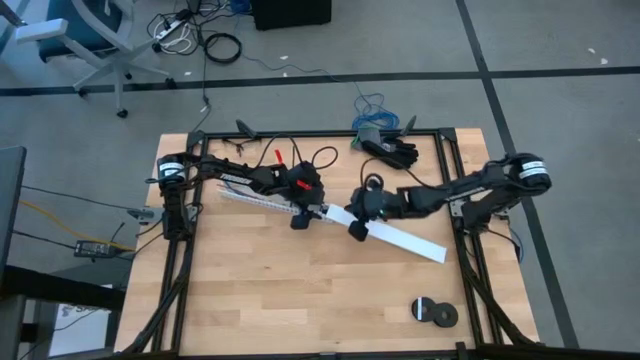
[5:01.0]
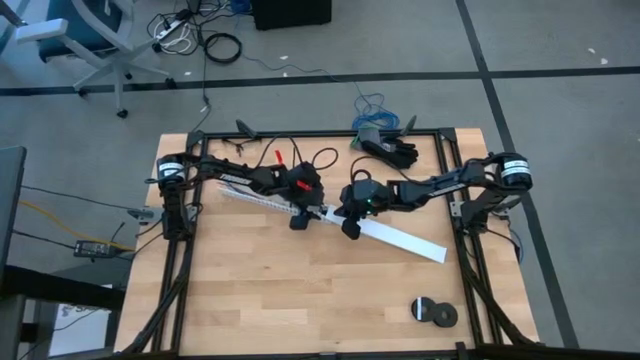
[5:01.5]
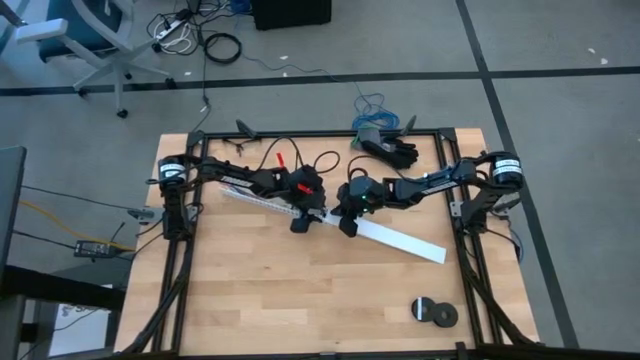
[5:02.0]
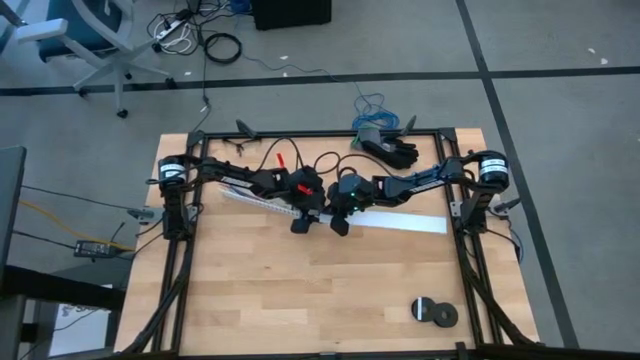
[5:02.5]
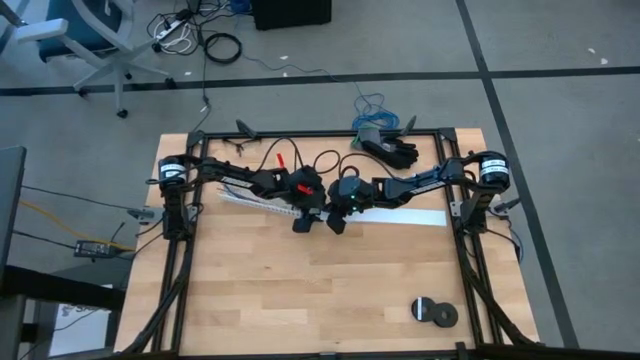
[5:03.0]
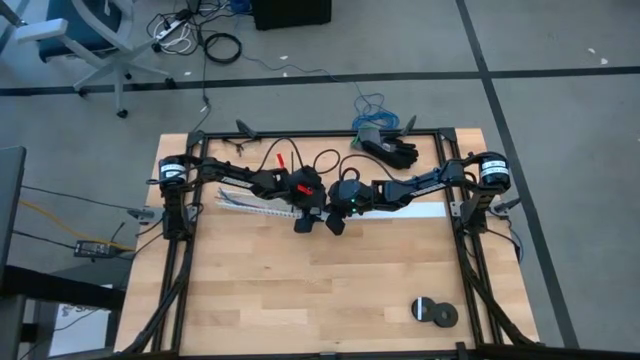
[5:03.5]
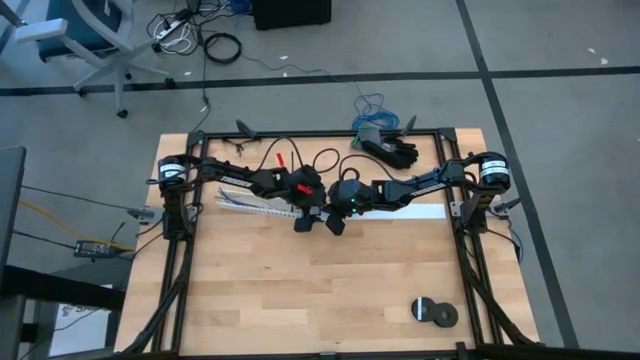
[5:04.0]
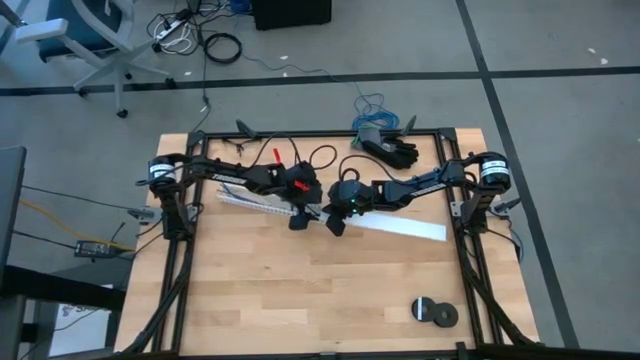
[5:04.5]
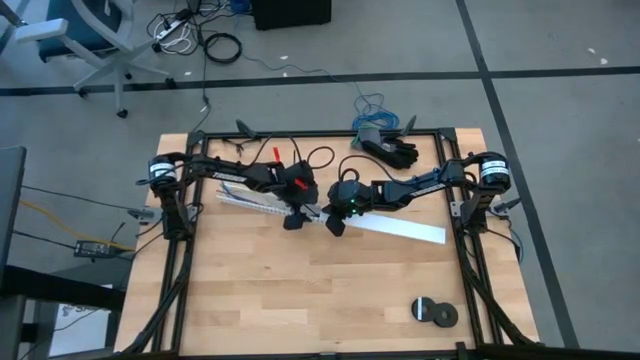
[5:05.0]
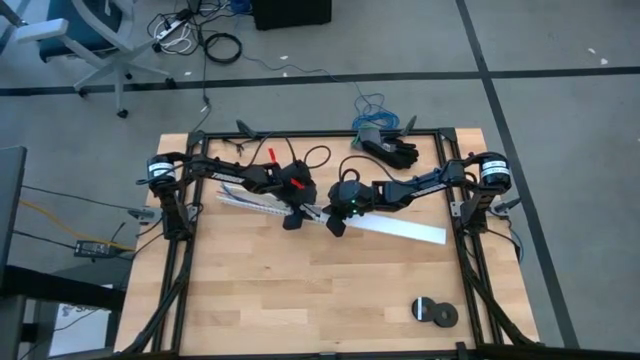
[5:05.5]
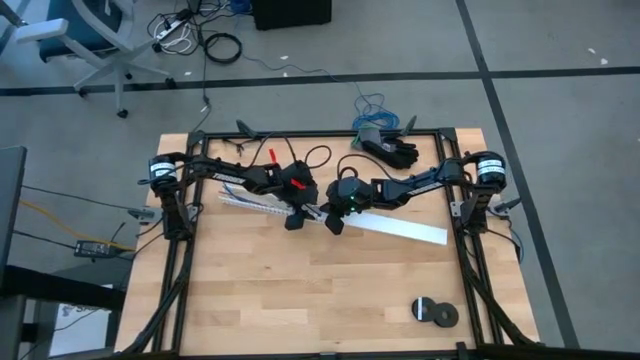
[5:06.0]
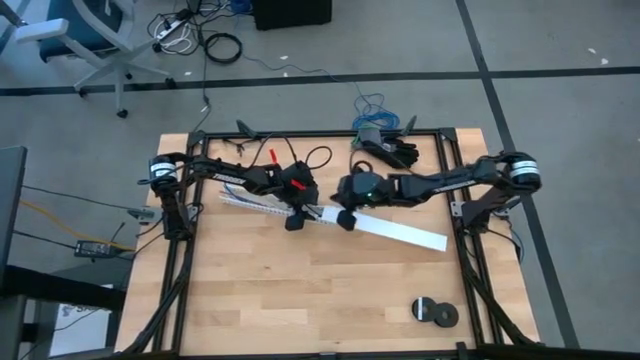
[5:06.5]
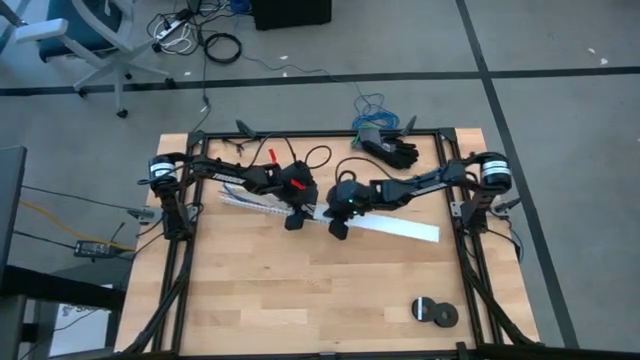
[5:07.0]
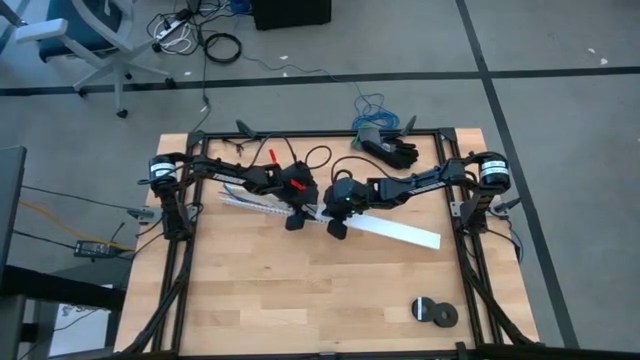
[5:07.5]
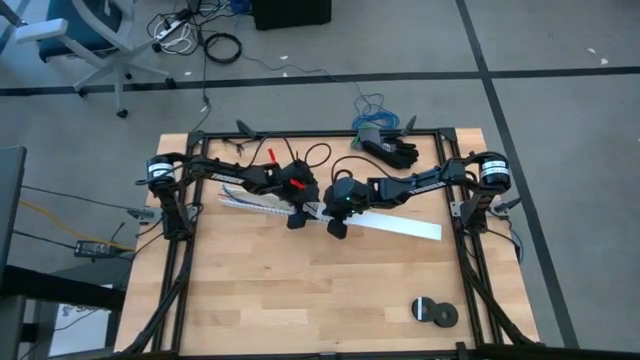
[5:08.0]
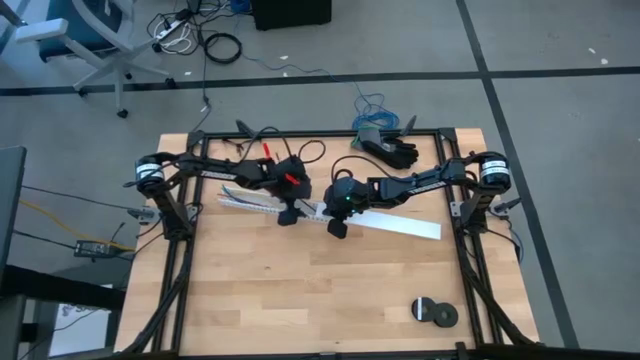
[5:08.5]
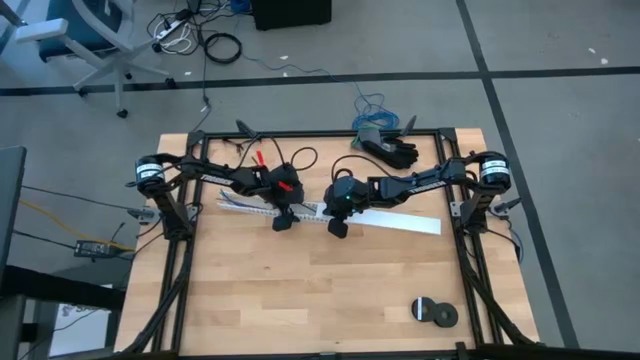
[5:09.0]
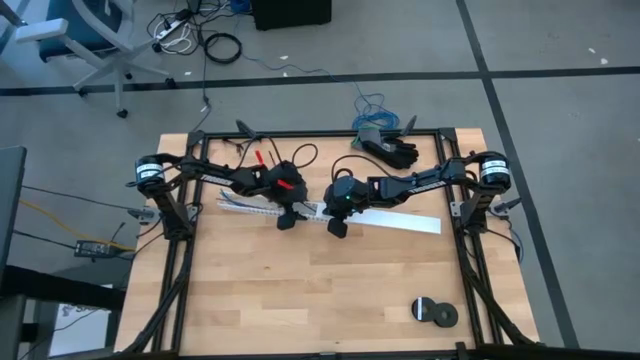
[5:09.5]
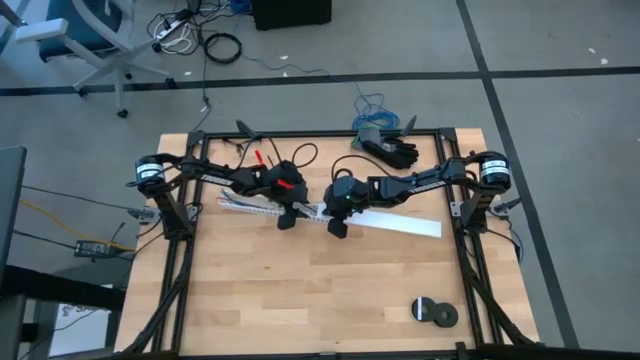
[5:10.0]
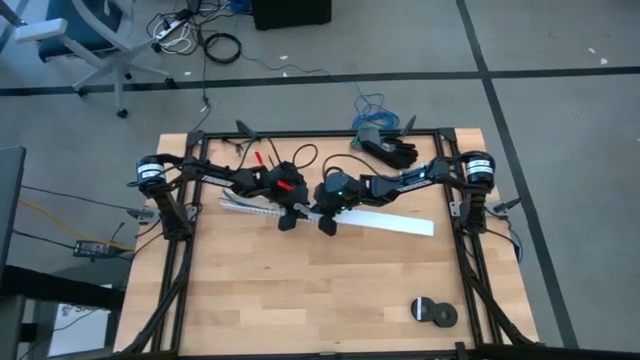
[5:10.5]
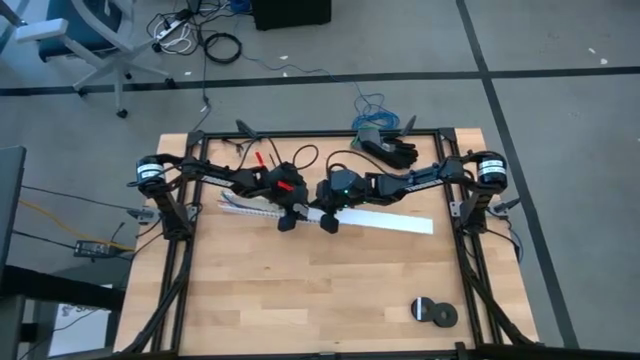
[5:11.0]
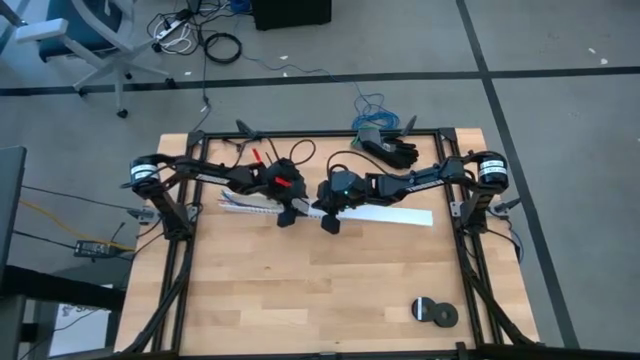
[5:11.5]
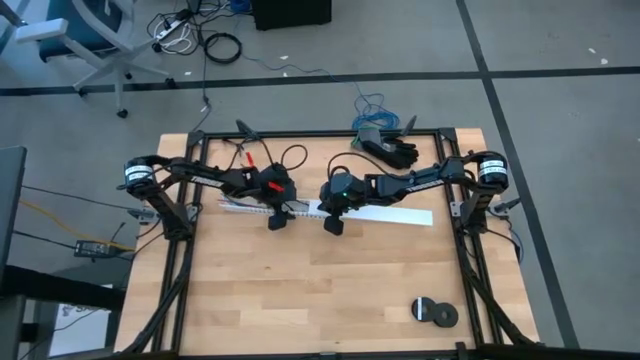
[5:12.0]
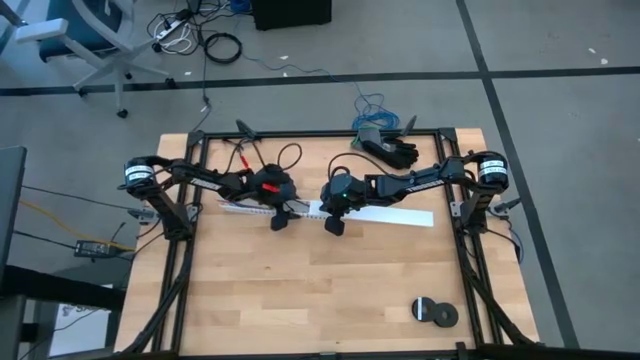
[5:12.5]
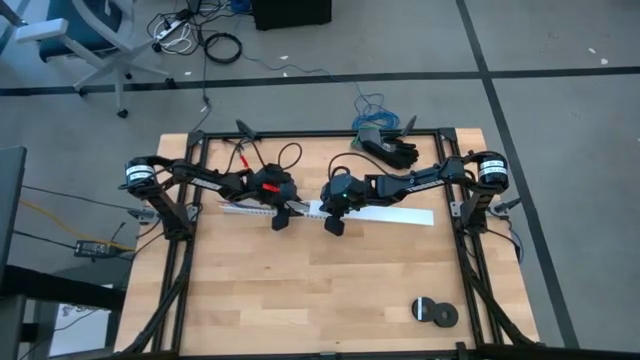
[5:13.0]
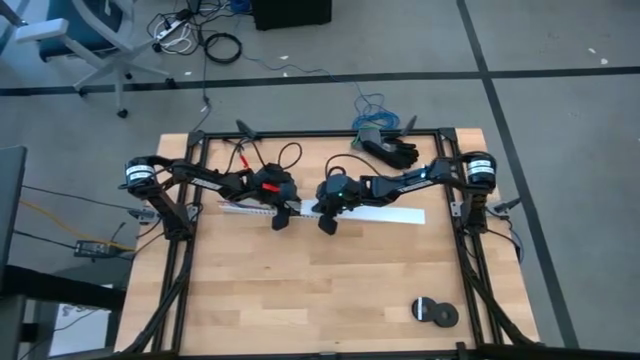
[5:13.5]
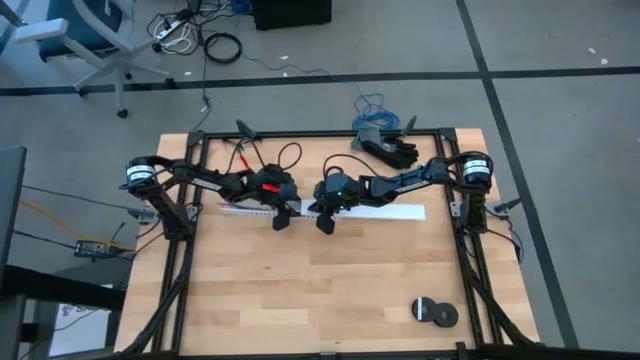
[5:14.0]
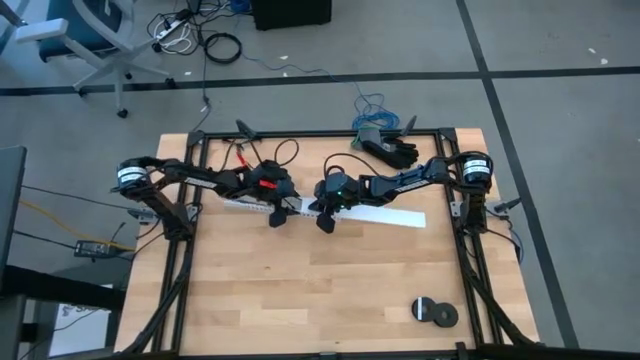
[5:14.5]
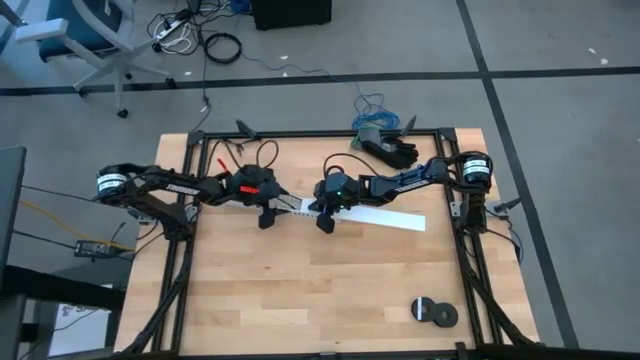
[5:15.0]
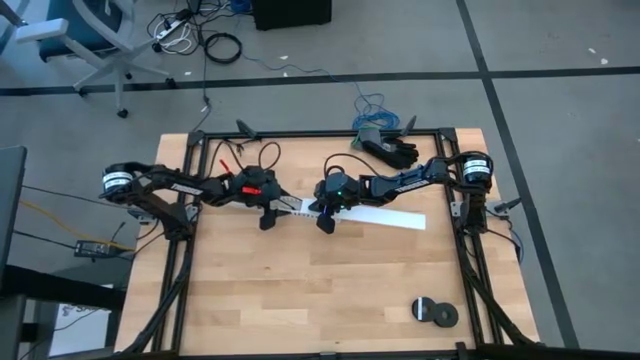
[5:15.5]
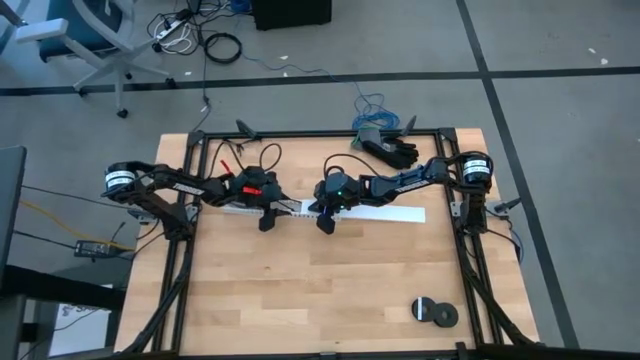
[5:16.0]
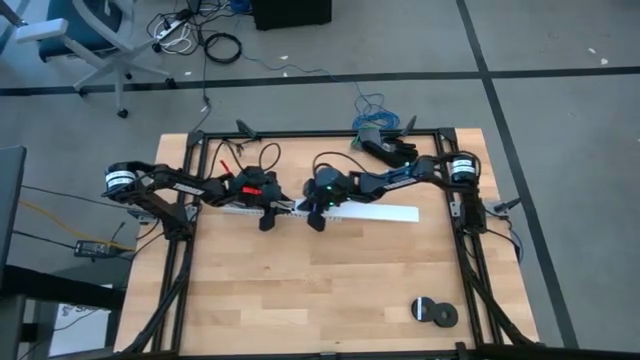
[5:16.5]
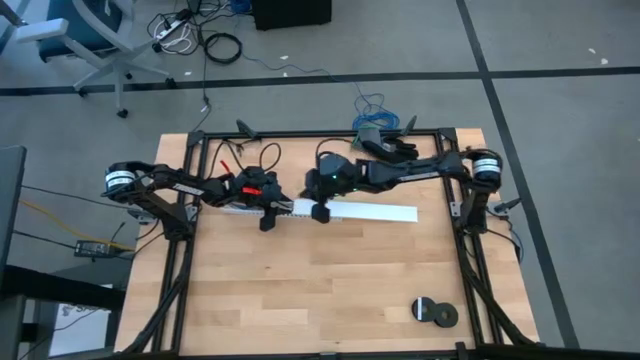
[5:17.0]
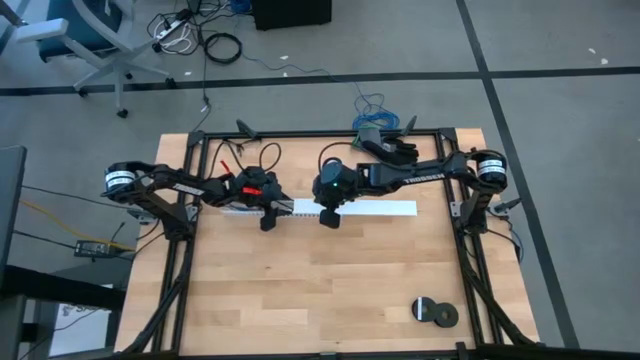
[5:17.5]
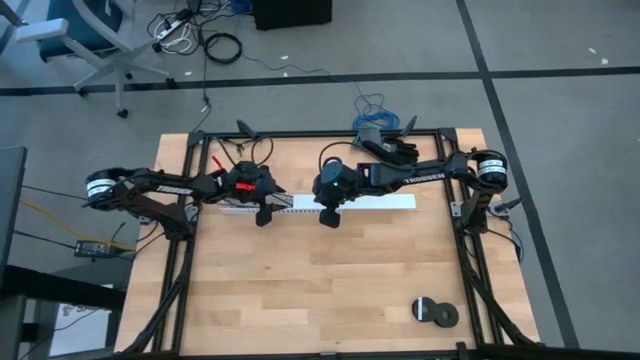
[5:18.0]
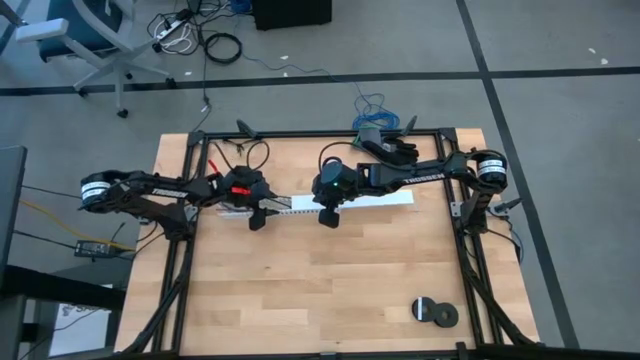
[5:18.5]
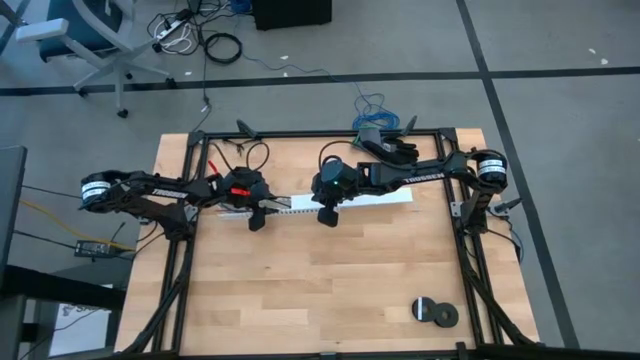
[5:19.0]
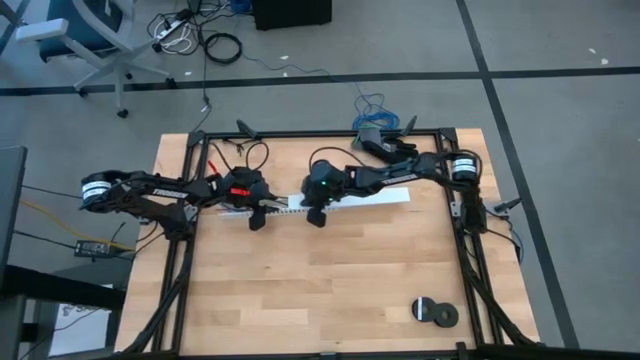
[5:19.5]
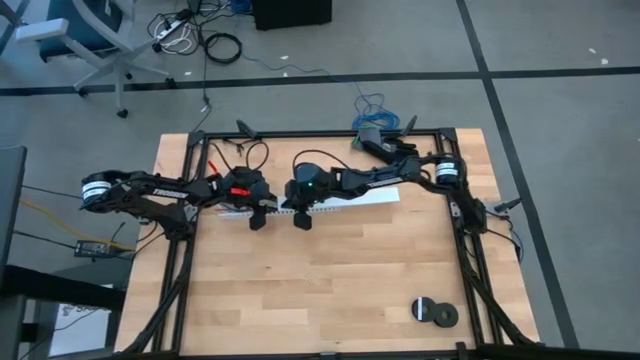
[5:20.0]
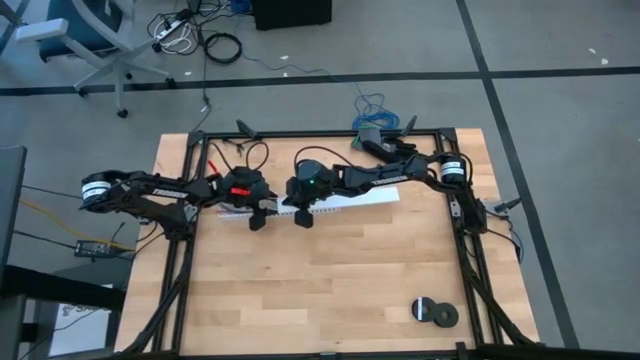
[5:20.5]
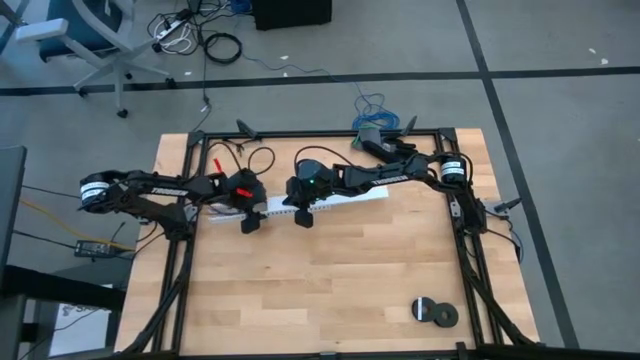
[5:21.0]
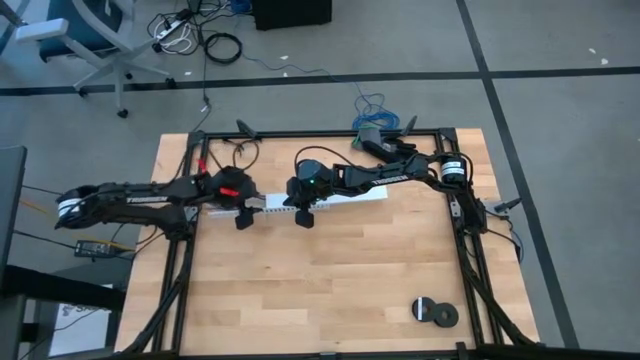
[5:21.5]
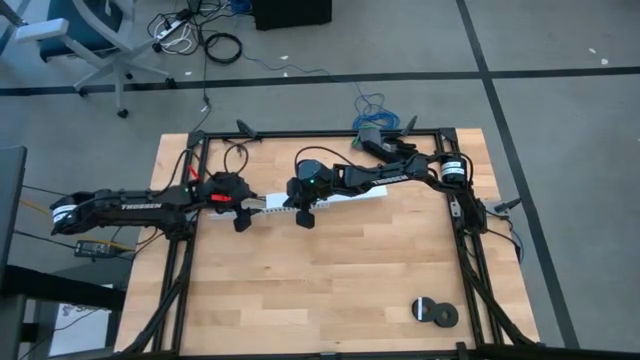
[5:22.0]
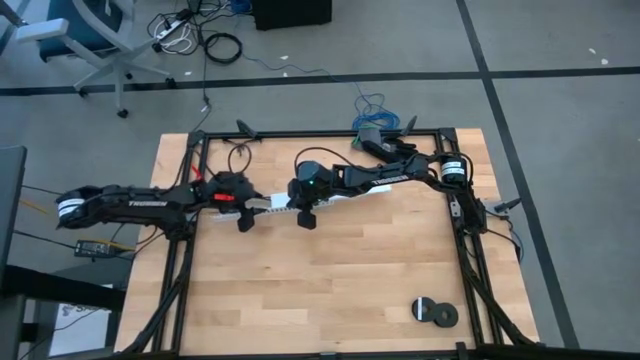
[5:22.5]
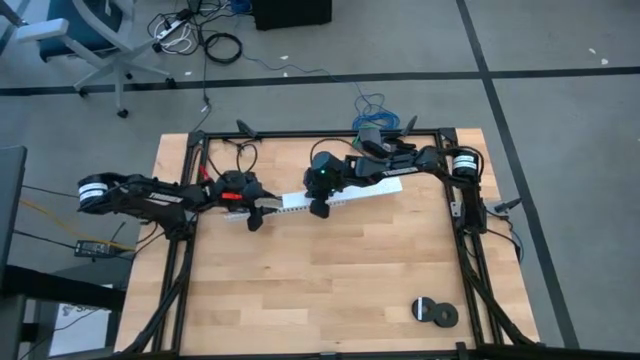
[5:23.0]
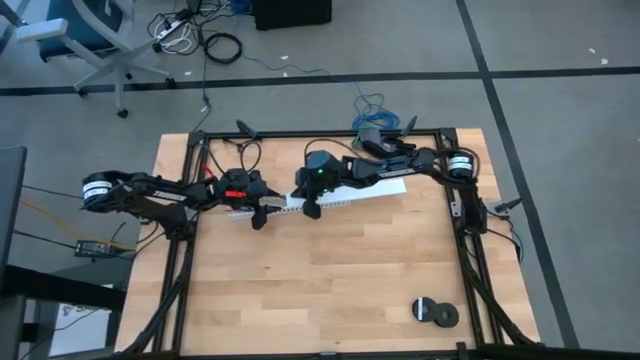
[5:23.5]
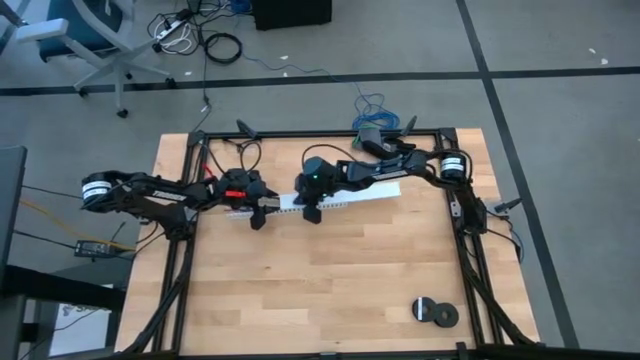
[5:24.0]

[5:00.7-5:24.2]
Task: Ziptie cables
Close the white cable duct lid
